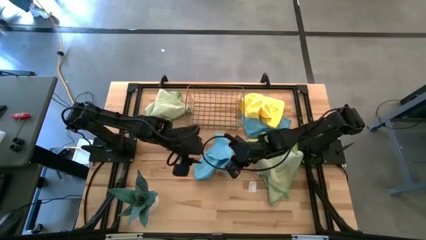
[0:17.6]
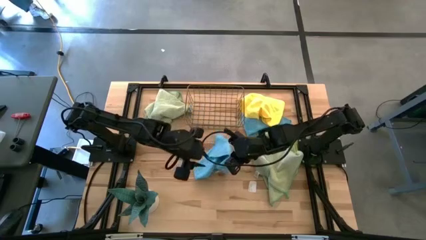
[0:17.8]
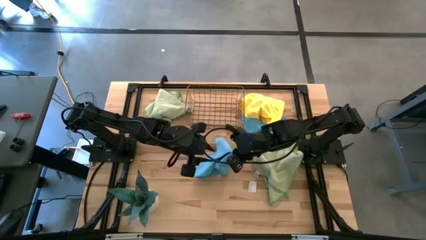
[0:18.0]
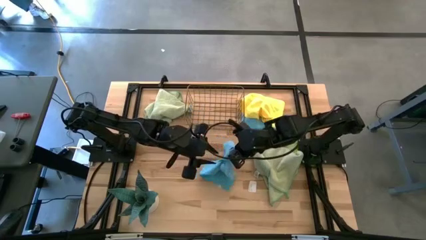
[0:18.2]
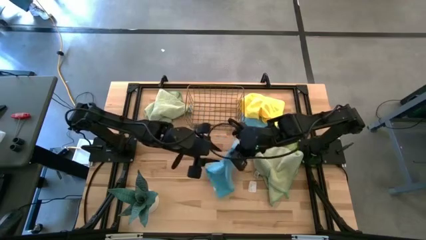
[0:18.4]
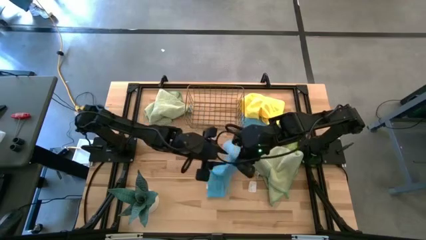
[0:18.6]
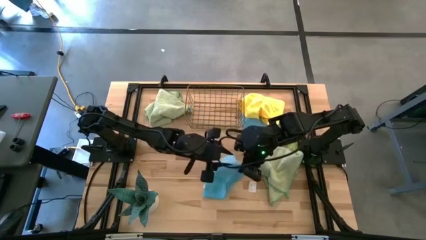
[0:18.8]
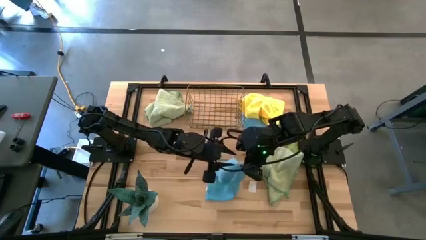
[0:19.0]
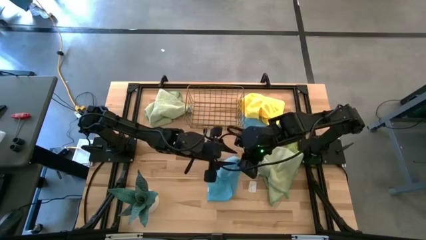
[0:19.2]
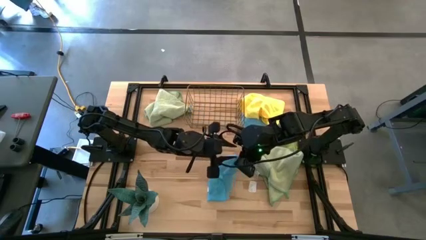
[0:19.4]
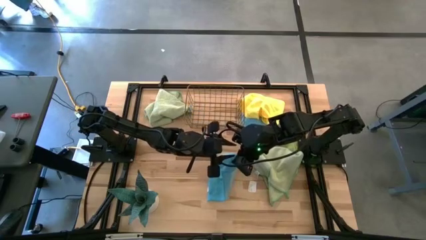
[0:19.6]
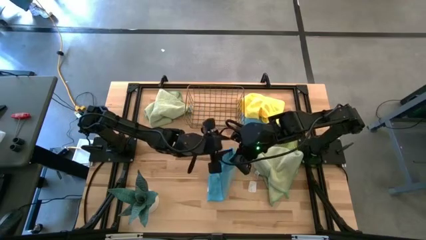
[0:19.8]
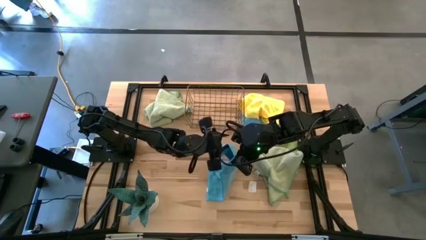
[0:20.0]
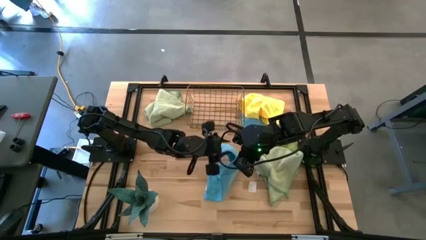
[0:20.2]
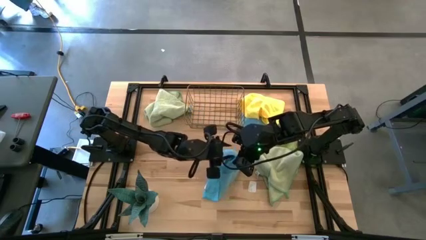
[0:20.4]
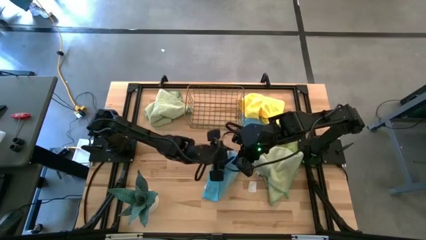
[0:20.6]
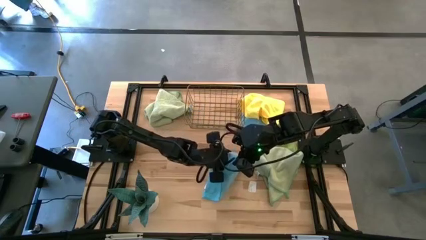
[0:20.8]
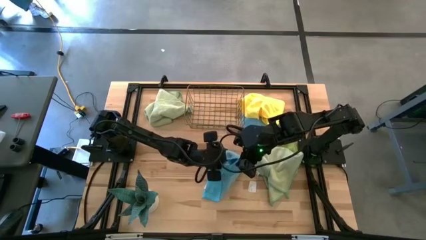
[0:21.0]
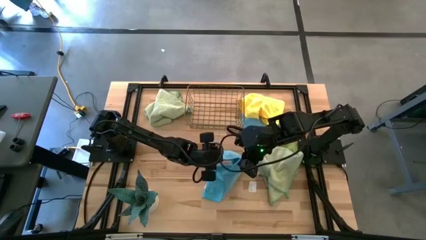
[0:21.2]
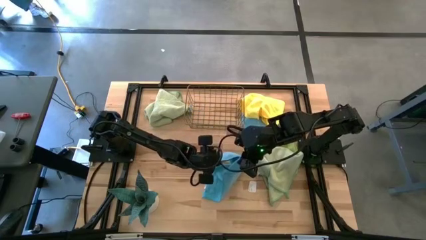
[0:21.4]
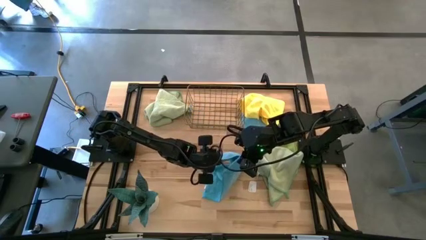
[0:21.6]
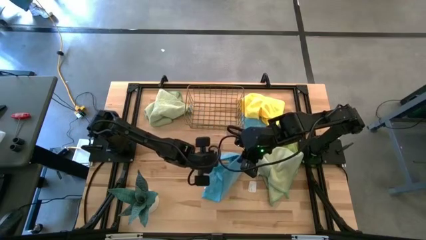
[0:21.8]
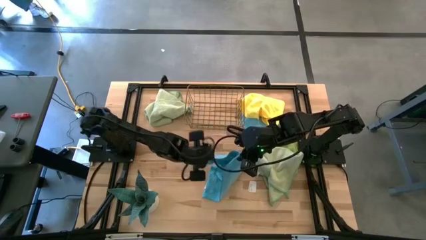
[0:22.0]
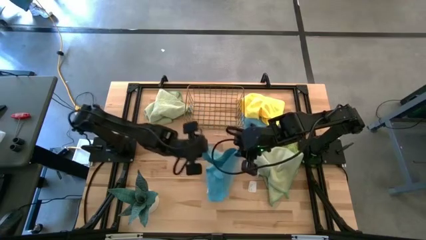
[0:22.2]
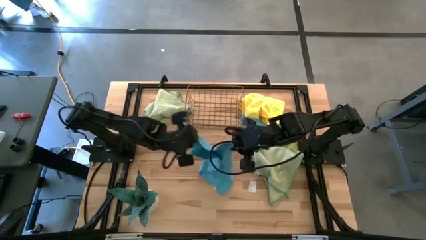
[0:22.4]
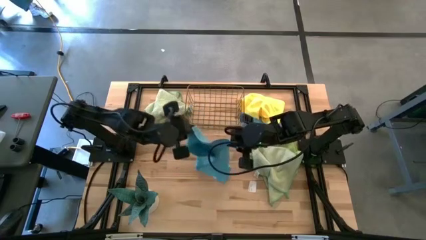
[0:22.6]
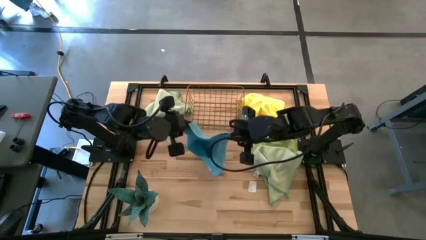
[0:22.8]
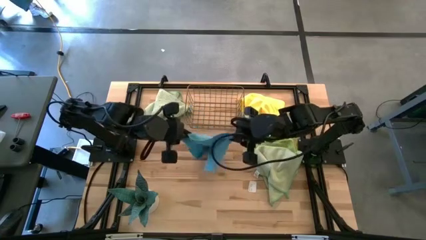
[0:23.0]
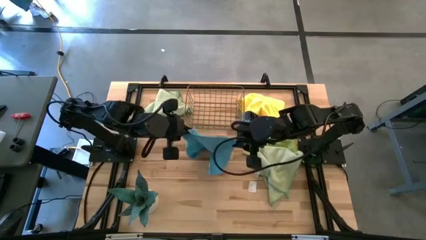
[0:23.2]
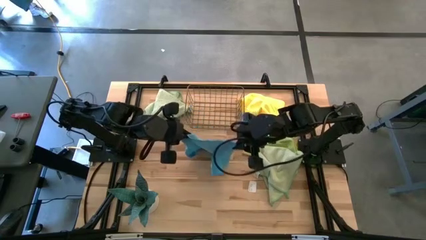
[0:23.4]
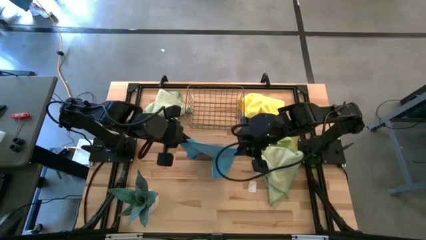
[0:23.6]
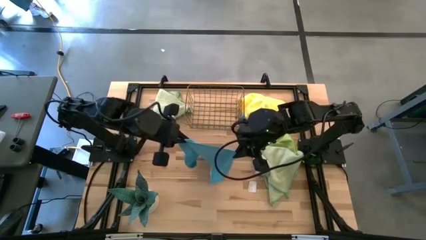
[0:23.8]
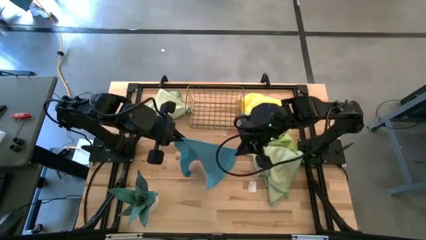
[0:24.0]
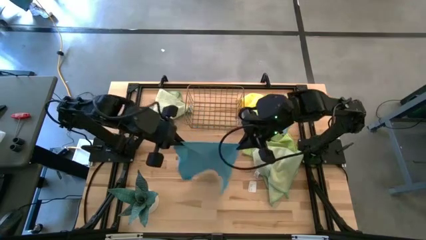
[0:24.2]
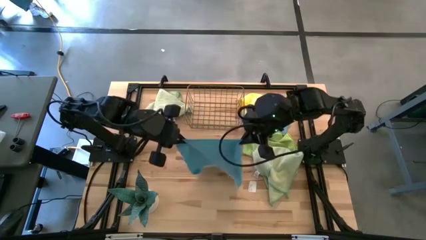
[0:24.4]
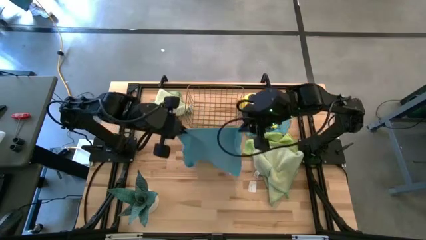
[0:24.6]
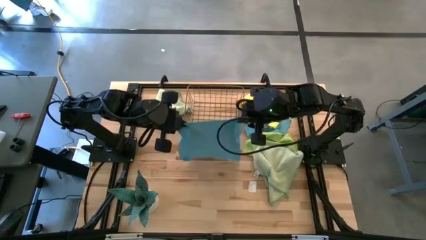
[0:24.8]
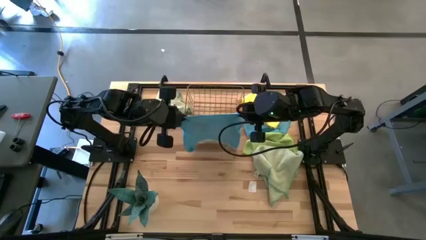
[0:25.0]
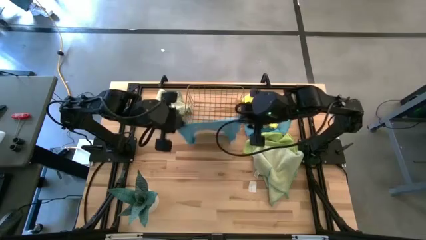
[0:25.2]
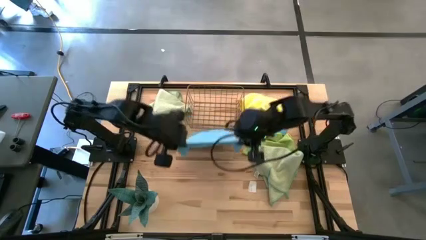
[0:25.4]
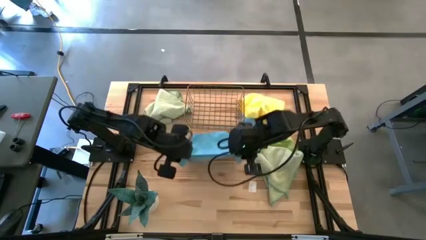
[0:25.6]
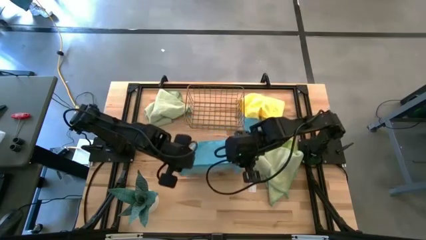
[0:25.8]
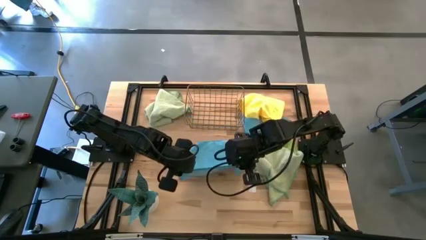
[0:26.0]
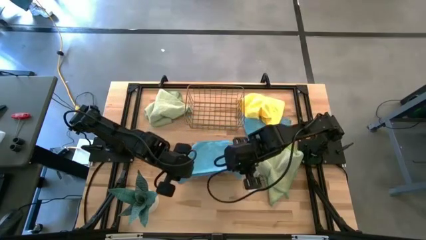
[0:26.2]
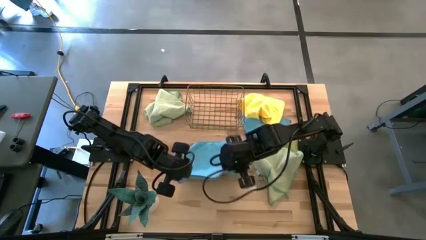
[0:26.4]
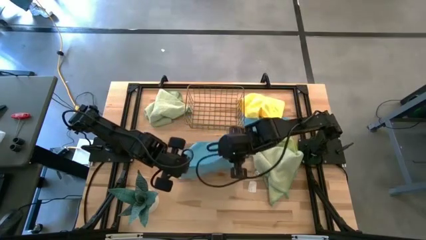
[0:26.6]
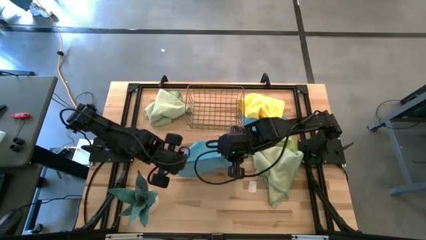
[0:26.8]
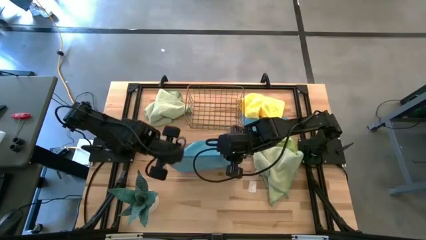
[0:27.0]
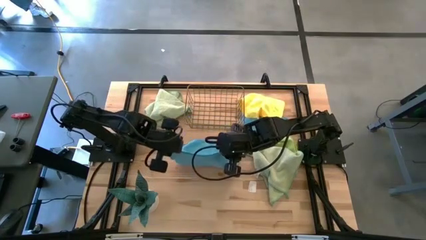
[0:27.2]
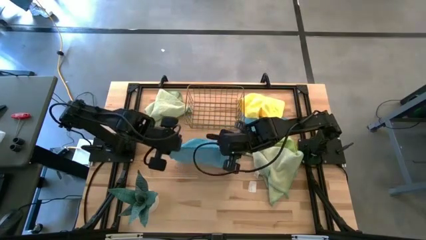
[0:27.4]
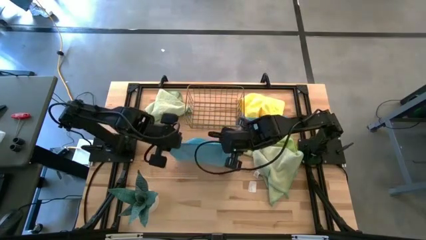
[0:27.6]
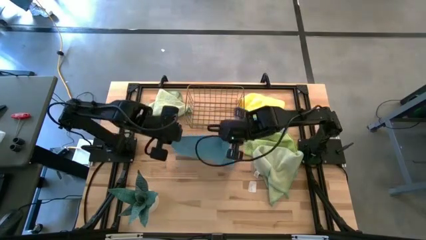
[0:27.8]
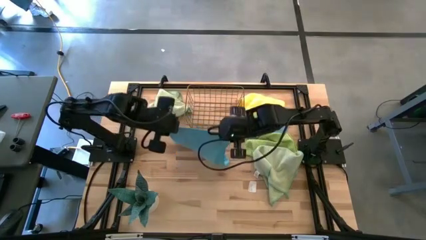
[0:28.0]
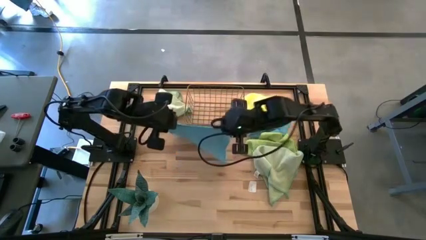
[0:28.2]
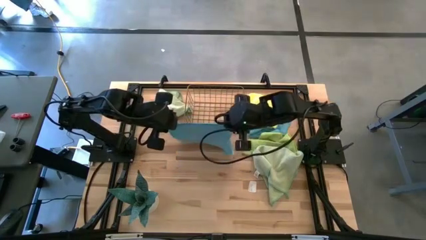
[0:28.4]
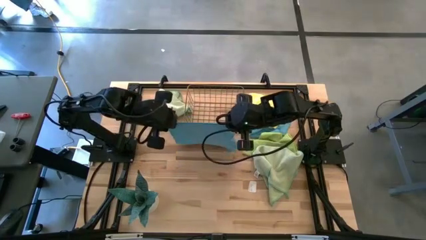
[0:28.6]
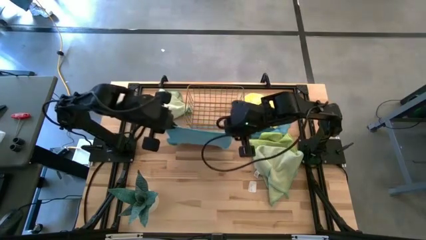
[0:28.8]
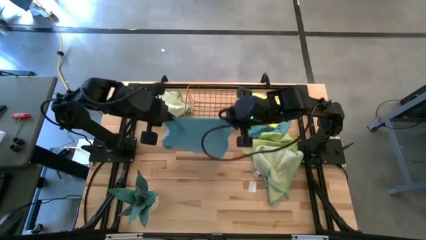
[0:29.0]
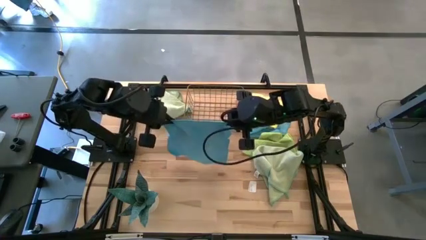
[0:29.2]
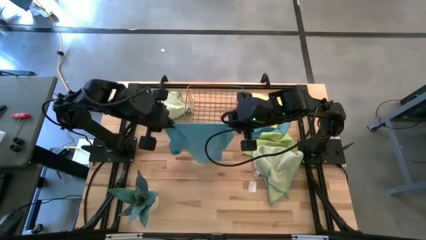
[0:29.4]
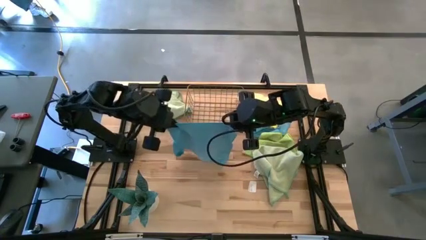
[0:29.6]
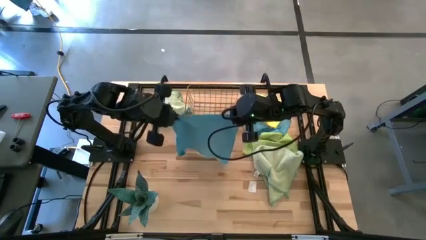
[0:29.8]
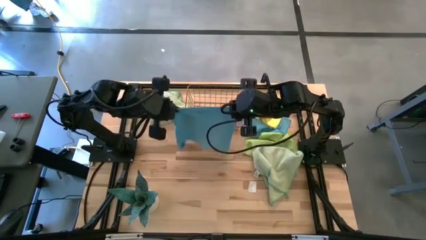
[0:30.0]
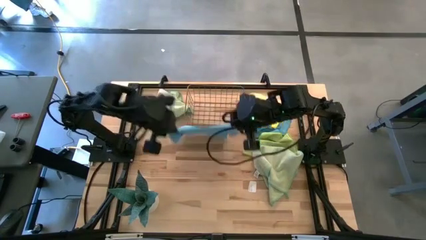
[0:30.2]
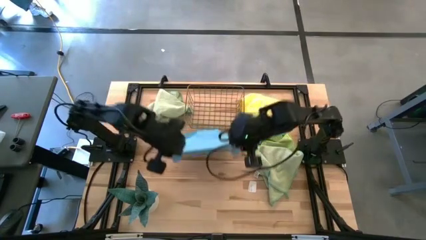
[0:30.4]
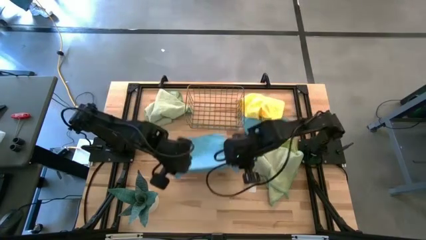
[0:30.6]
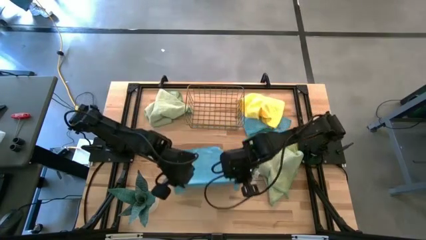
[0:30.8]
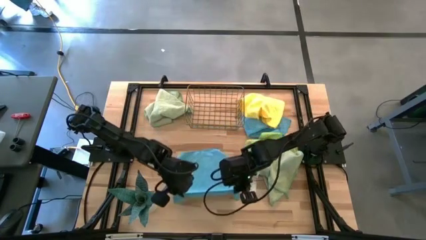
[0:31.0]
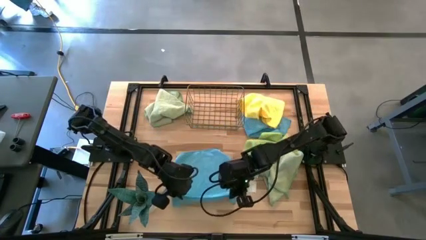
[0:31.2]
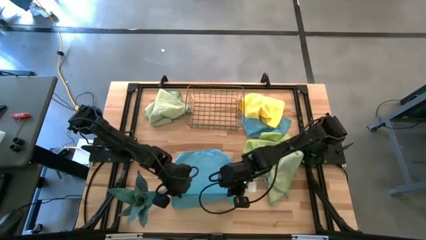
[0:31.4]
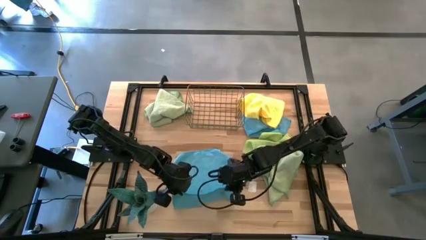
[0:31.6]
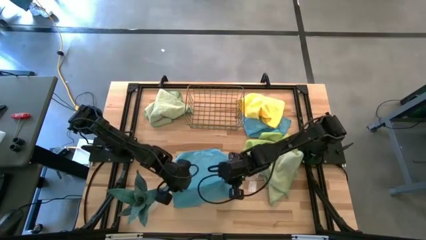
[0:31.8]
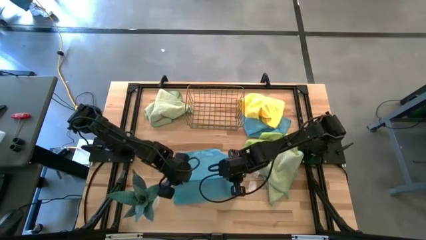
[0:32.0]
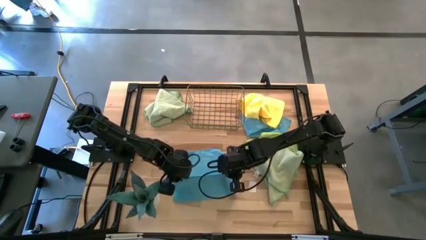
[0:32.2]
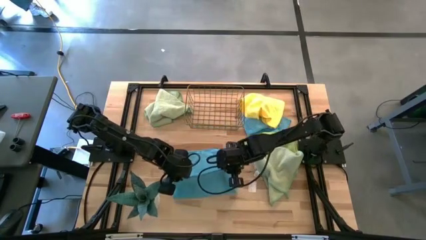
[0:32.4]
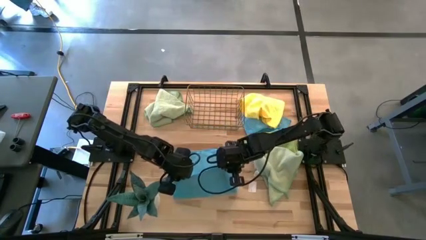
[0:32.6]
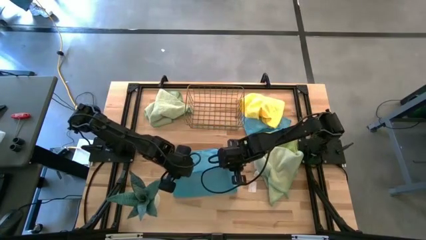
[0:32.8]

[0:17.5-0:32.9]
Task: Fold microfiber towels
Fold the left blue towel
